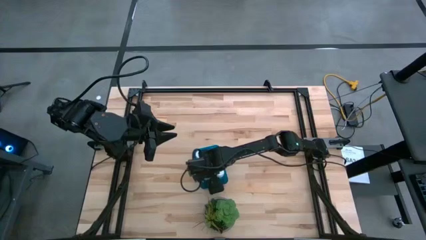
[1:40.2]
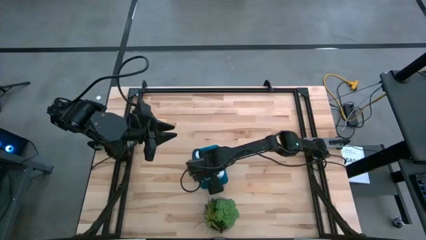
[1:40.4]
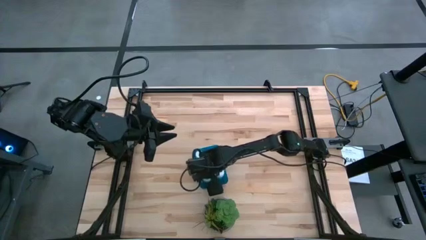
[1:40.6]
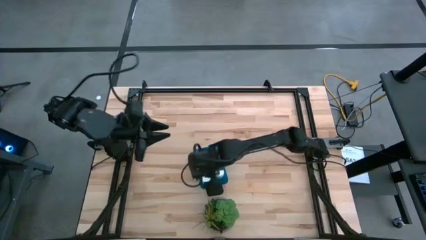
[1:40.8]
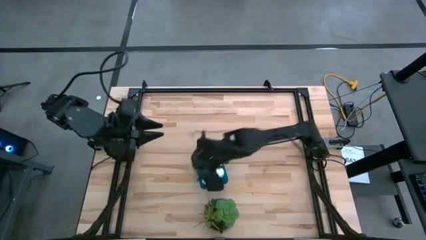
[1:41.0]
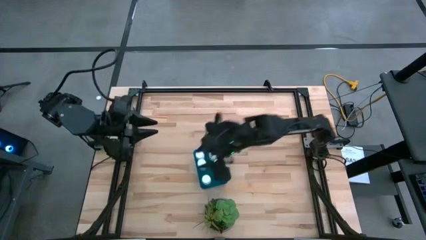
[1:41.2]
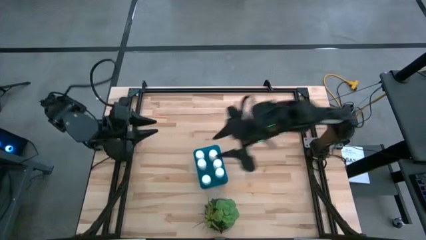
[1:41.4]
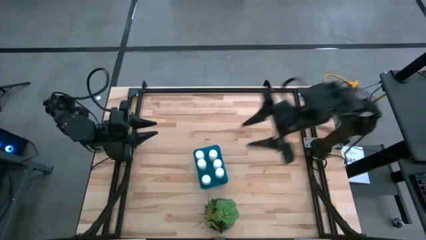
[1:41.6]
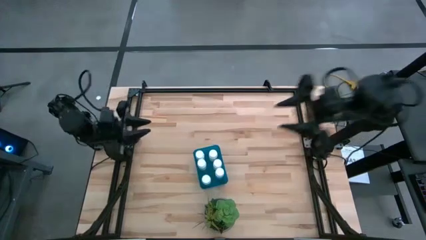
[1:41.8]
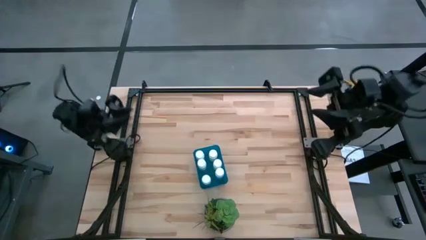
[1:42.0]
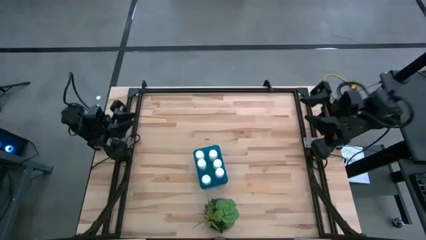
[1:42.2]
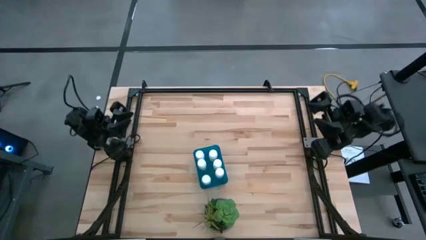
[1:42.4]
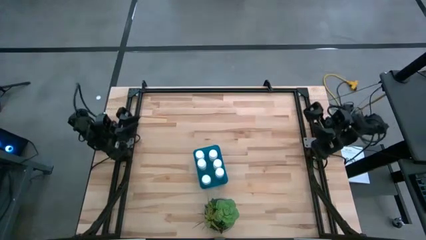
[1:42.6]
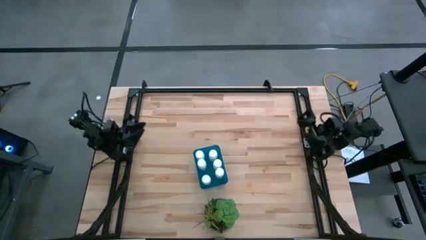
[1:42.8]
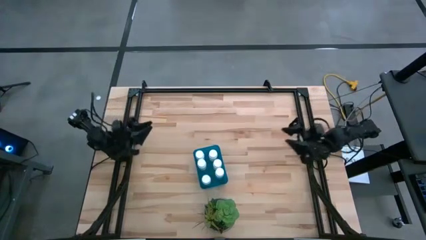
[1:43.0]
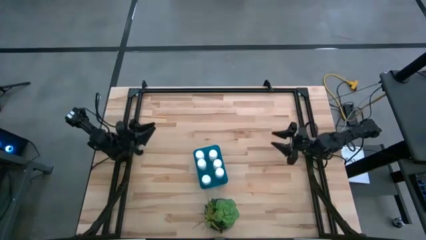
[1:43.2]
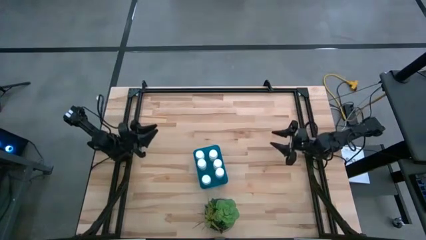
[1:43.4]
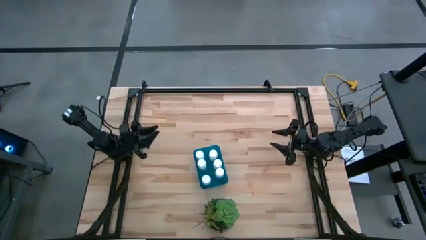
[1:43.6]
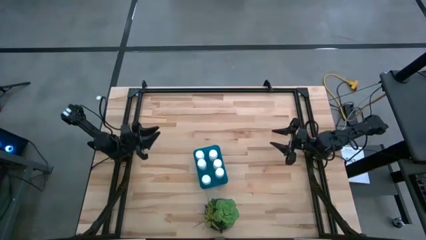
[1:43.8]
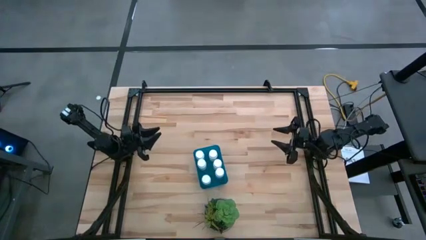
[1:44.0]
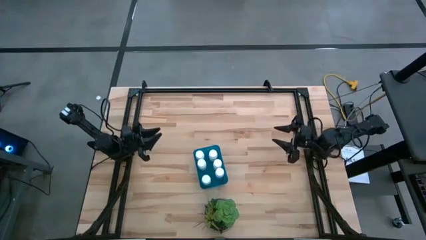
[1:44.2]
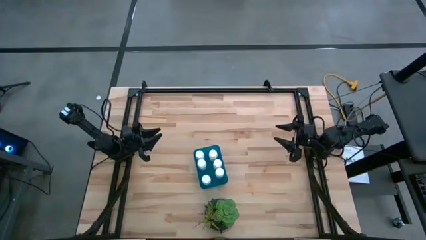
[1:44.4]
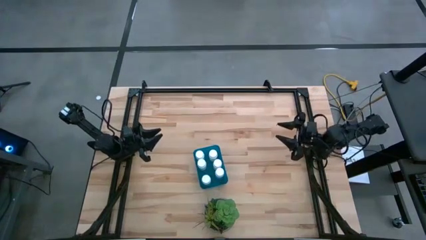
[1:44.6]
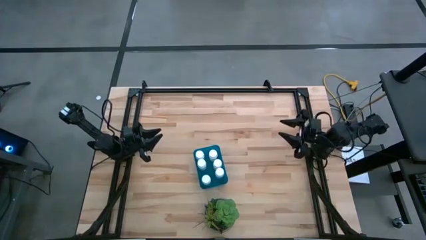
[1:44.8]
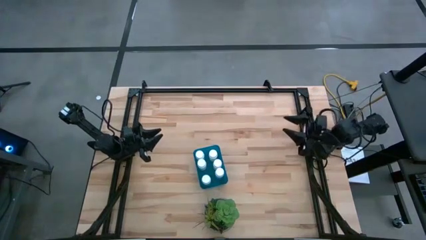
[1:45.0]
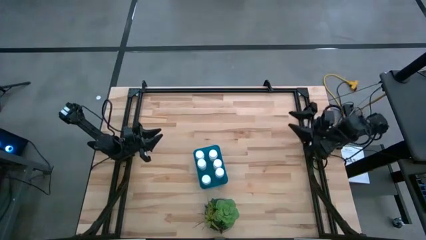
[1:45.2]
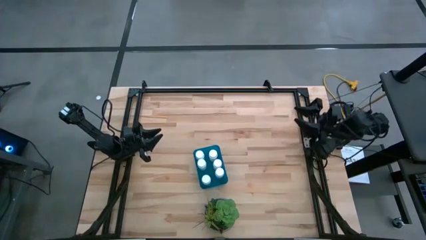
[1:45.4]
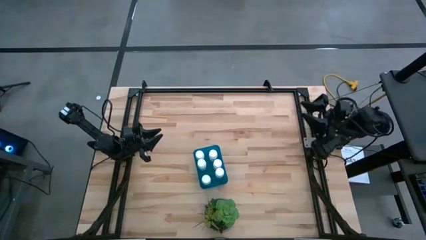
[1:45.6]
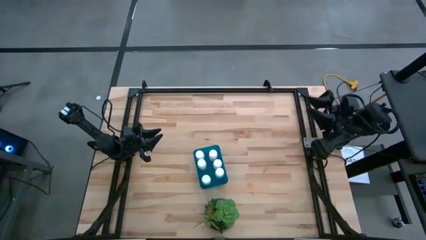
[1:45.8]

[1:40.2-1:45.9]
Task: Pick and place pill bottles into a basket
Return to Home Position

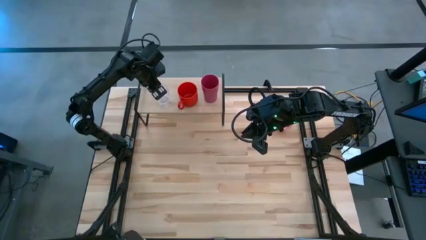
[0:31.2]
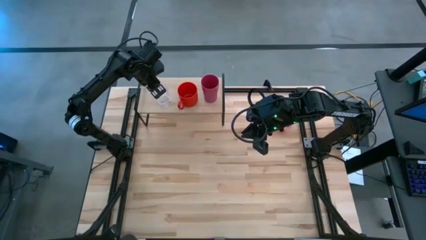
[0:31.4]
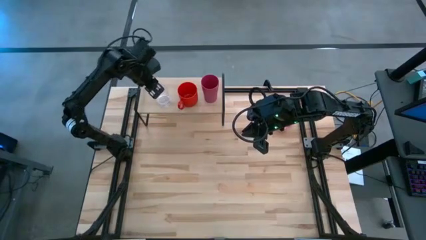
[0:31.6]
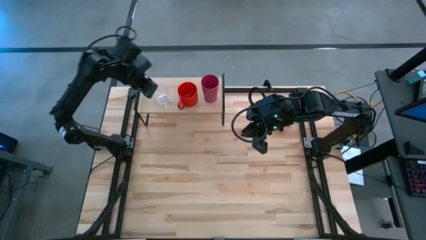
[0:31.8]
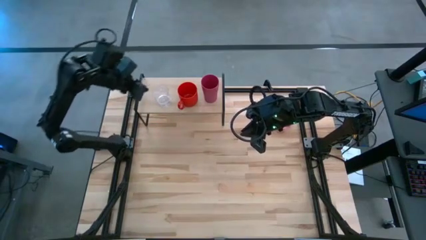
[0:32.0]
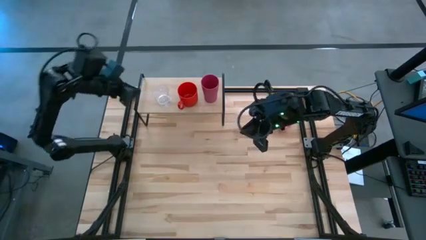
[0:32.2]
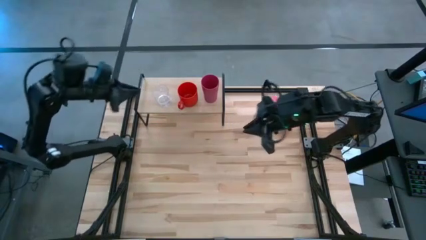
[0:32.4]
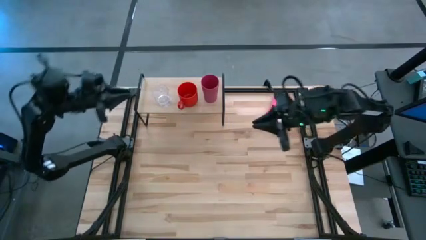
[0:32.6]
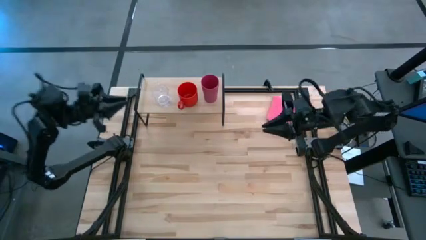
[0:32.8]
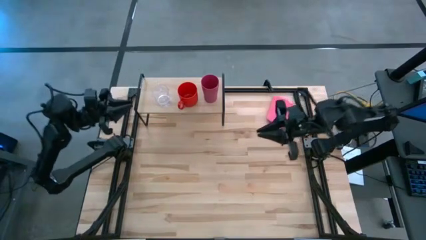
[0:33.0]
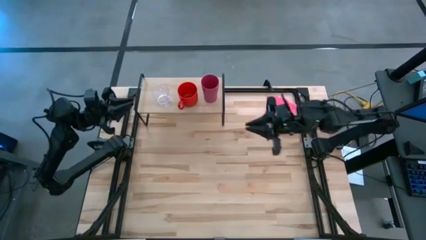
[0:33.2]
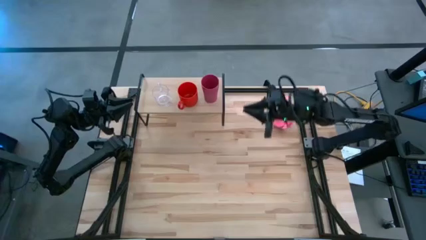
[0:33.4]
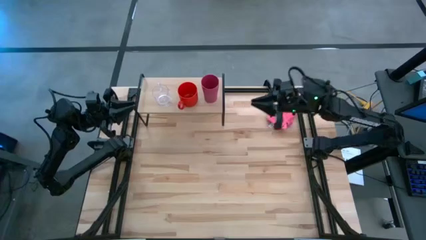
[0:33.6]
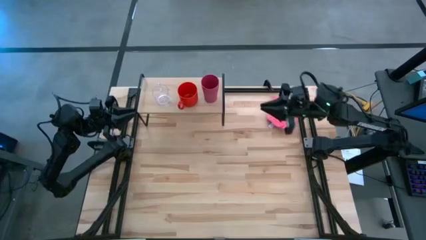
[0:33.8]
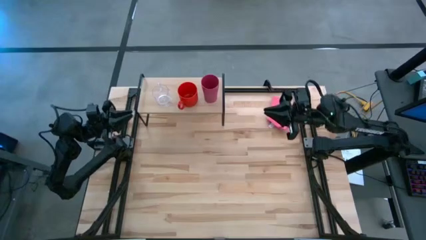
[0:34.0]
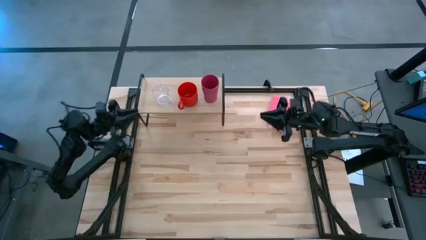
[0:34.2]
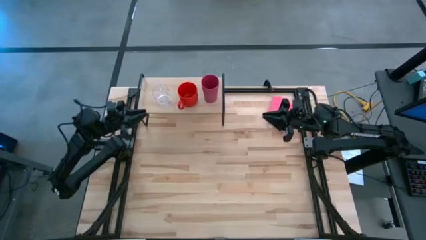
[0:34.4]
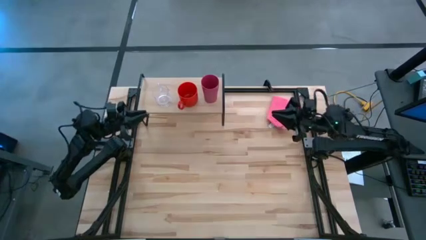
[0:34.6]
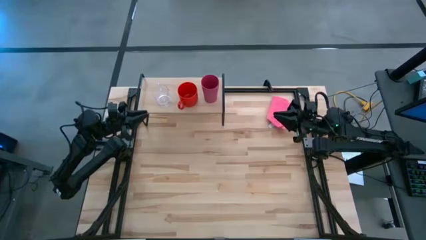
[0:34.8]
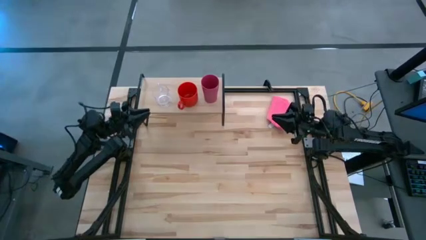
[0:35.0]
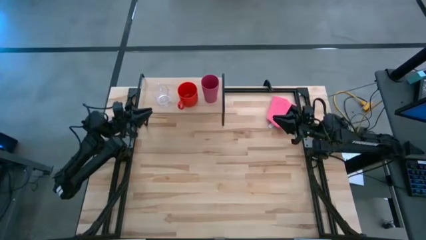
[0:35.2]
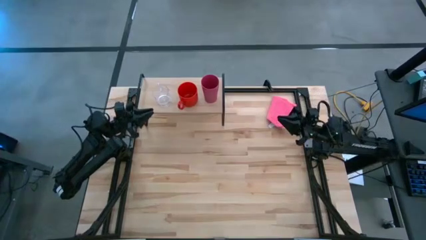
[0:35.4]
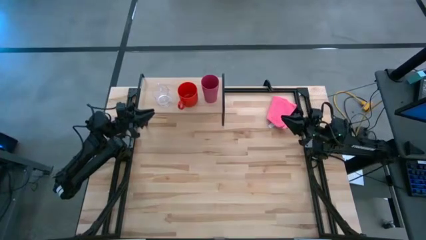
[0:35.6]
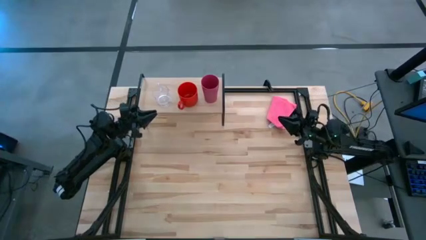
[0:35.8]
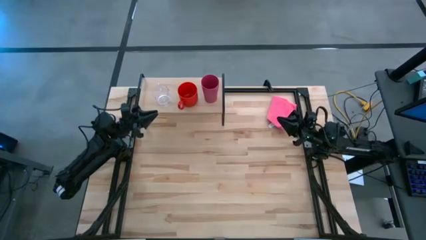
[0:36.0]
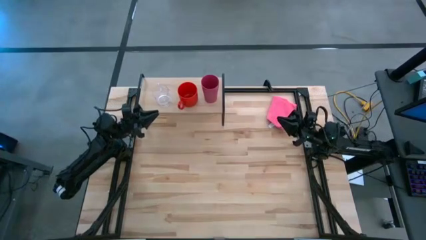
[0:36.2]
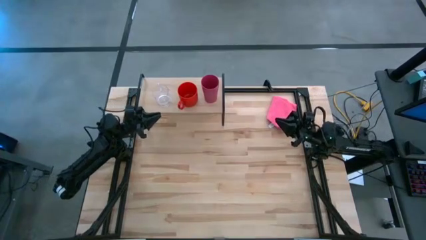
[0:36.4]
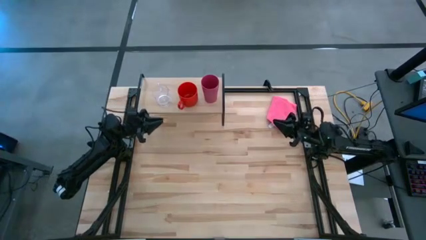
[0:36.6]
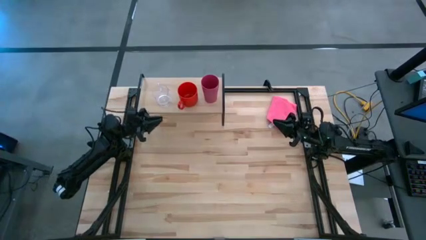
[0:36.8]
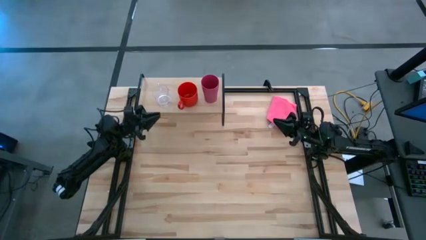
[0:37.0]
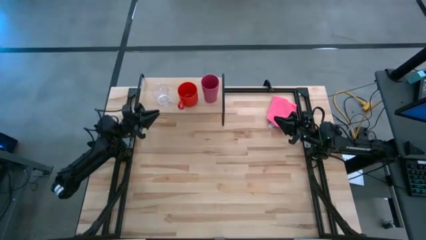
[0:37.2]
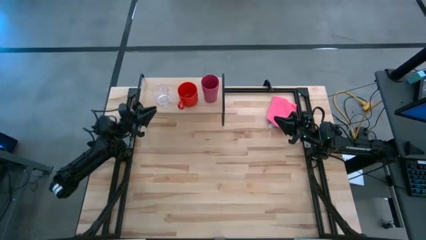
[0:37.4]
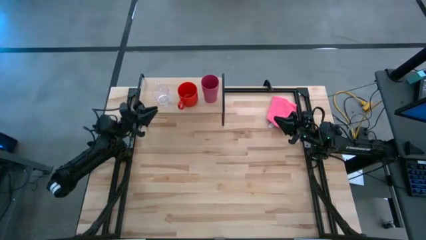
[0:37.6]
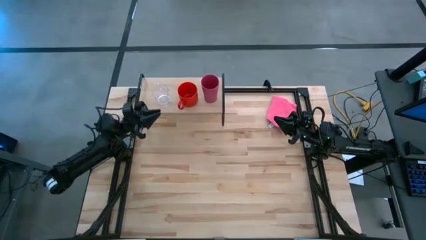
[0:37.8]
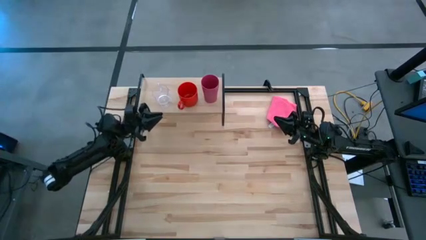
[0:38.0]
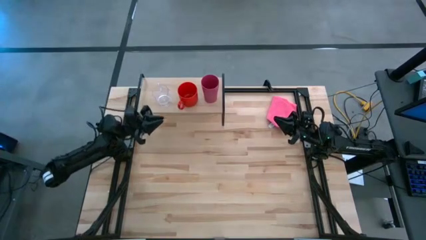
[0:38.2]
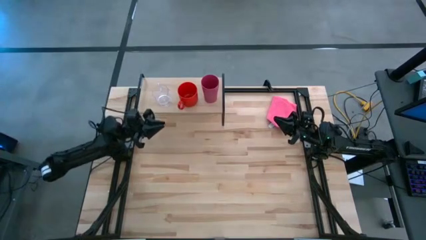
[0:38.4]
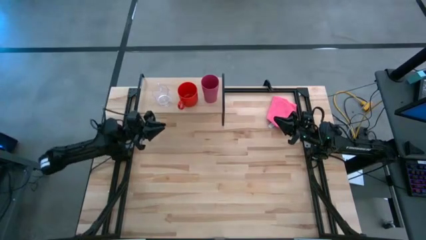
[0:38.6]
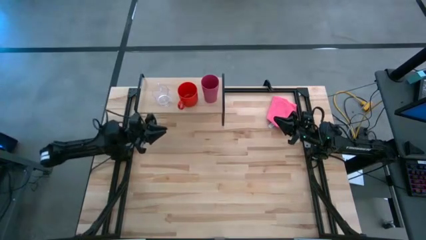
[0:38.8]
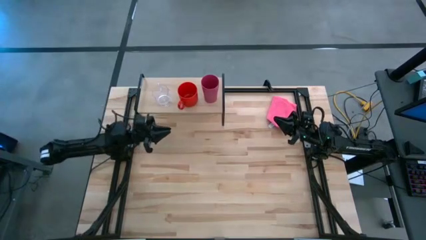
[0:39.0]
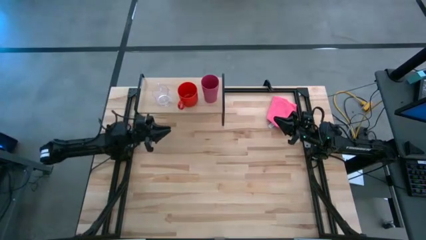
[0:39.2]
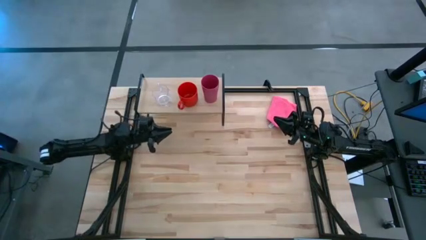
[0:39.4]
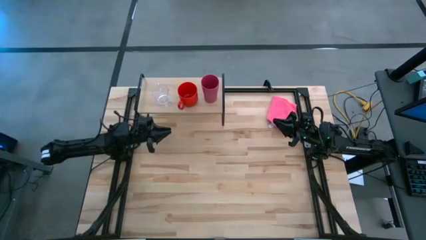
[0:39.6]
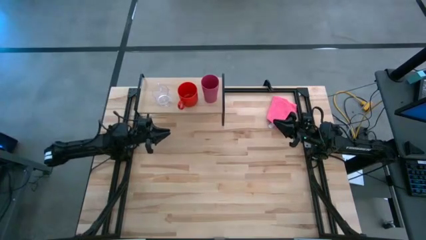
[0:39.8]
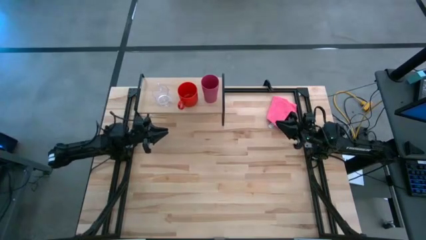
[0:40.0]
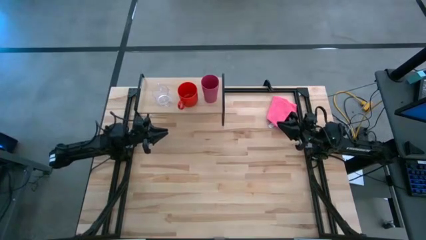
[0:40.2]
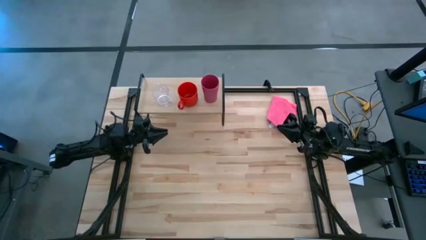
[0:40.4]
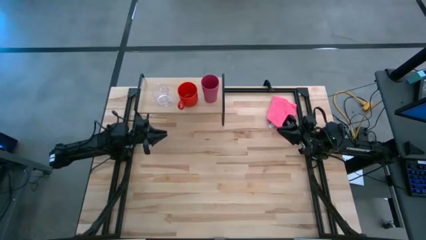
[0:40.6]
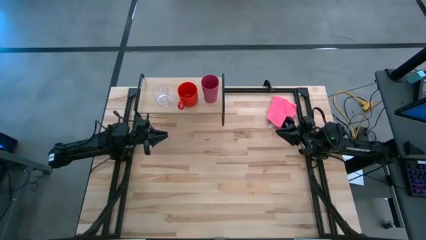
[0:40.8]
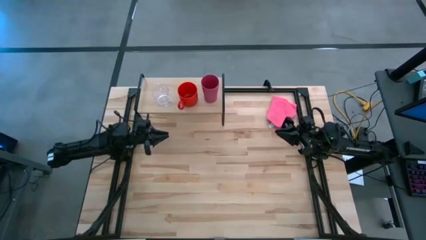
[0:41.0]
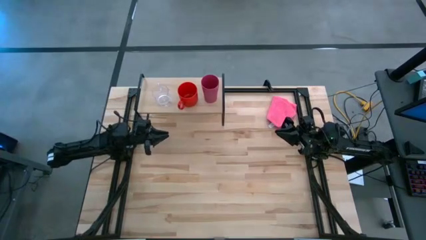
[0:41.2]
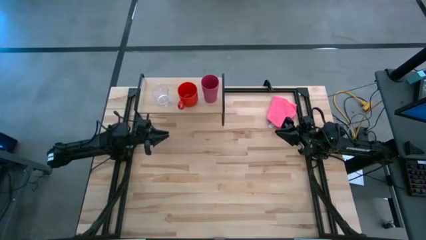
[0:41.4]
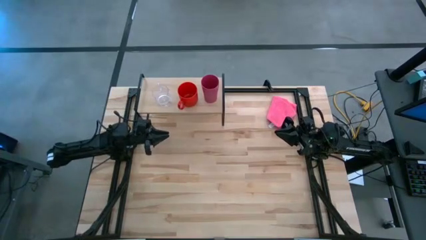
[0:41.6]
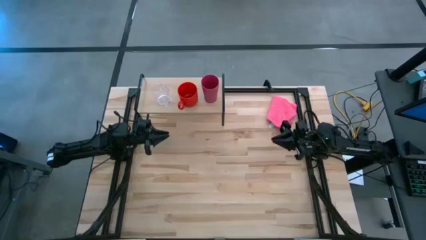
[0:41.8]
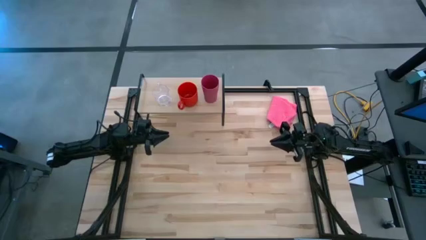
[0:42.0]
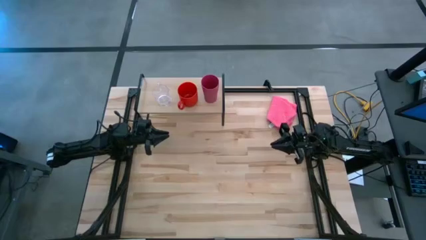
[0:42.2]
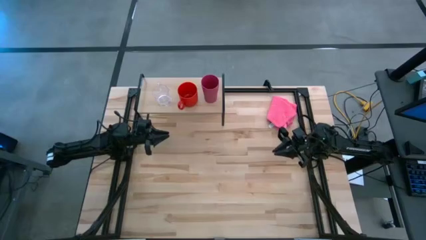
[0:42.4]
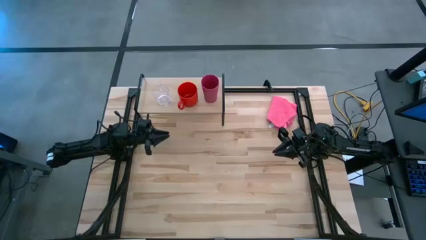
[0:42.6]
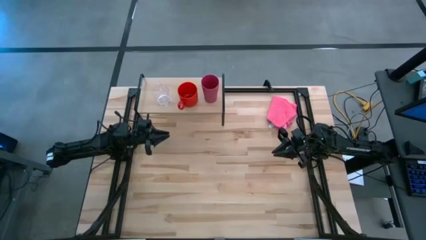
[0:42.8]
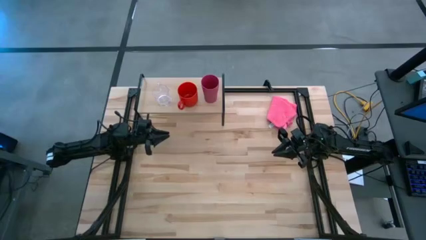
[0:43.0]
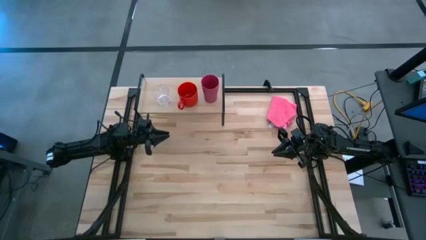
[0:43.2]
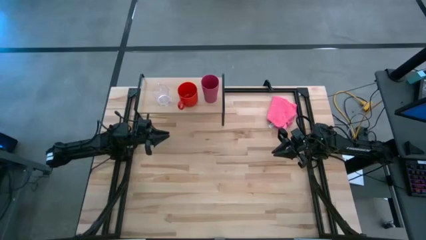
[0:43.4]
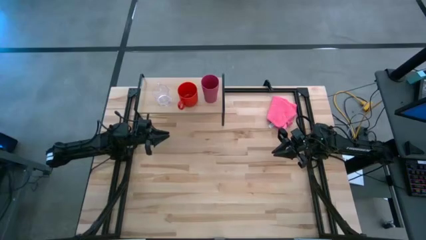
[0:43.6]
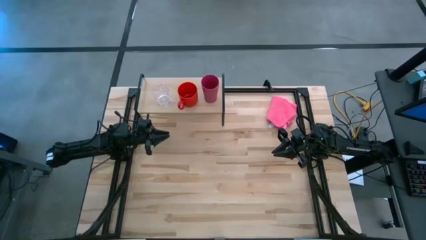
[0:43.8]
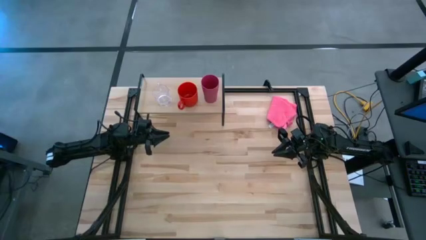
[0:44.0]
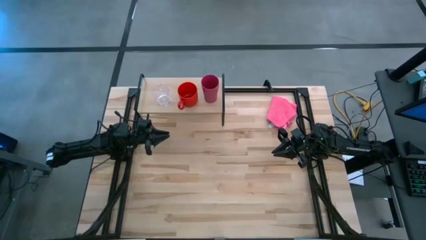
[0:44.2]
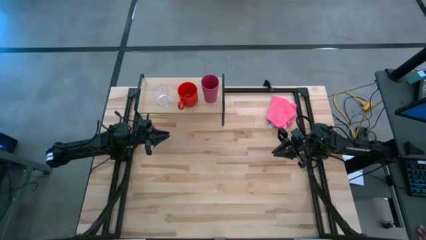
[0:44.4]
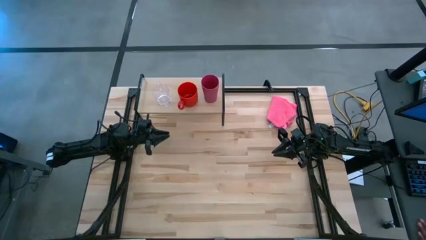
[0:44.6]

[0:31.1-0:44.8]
Task: Stack small to large cups/mugs on shelf
Return to Home Position
